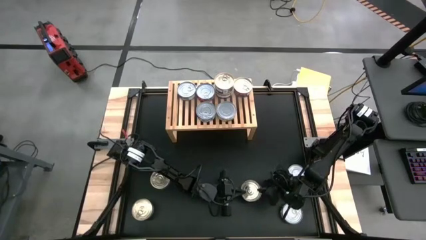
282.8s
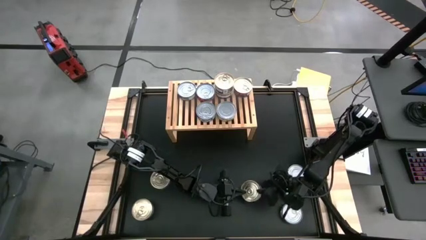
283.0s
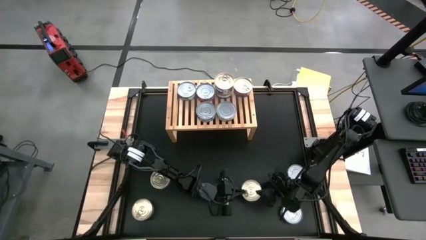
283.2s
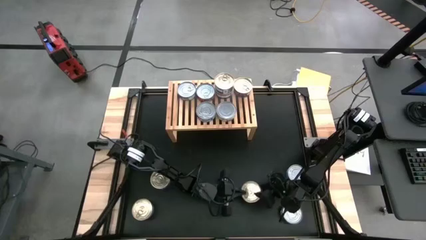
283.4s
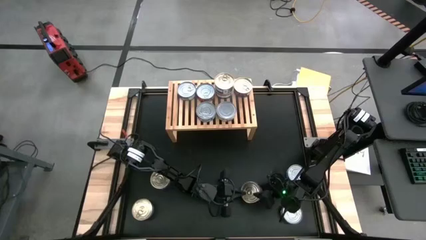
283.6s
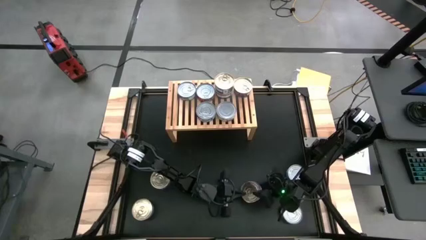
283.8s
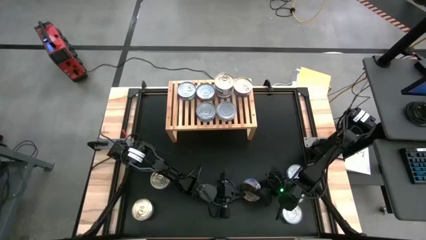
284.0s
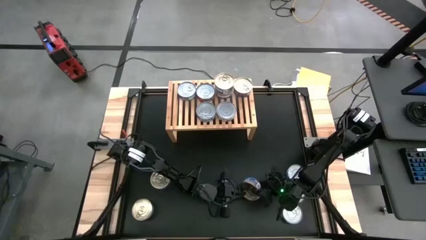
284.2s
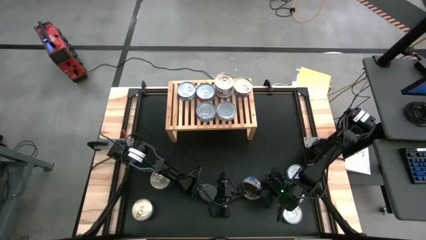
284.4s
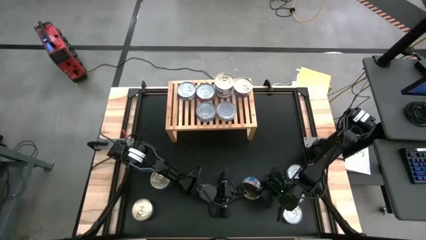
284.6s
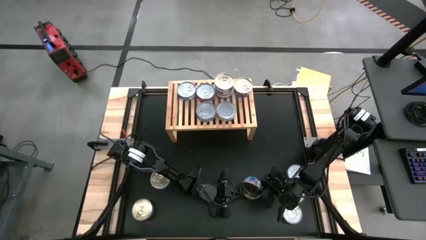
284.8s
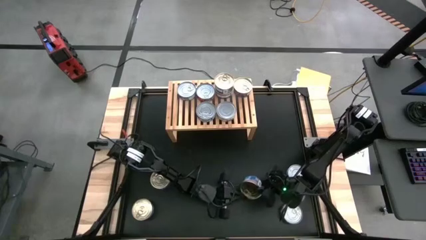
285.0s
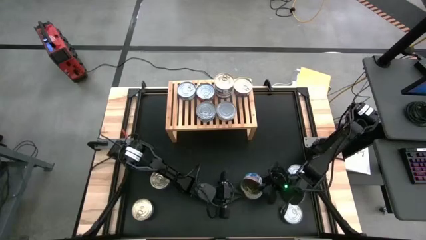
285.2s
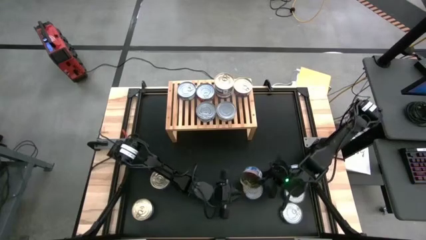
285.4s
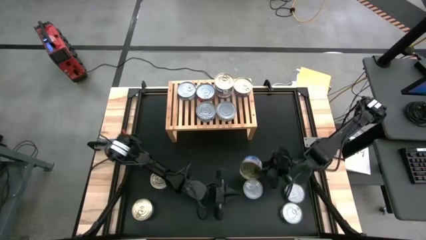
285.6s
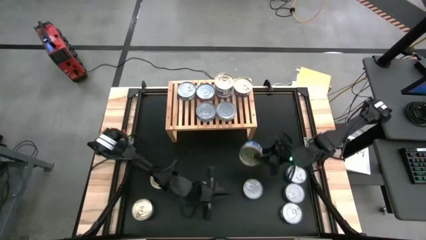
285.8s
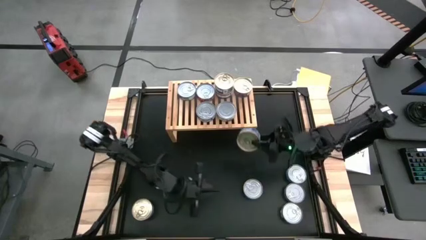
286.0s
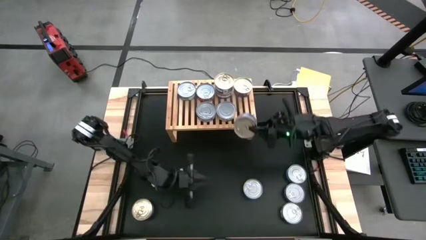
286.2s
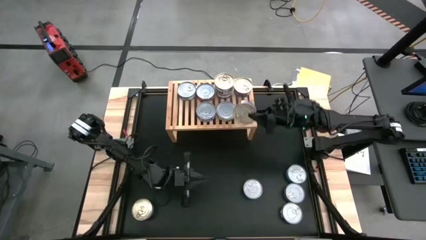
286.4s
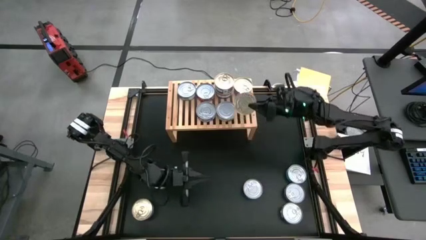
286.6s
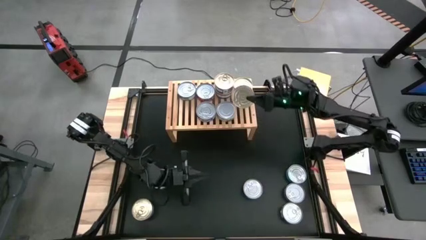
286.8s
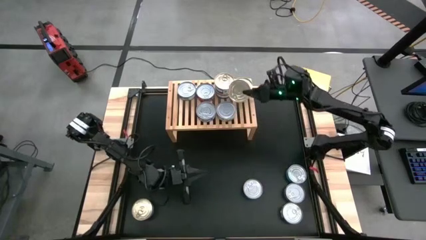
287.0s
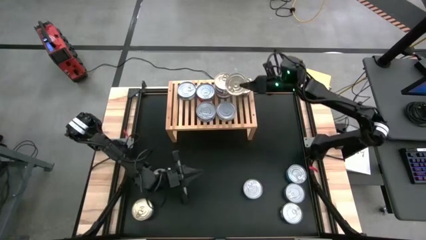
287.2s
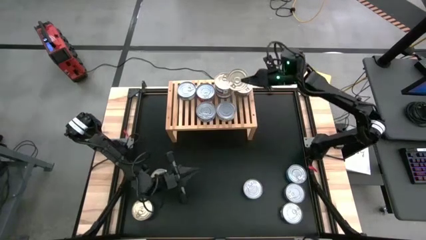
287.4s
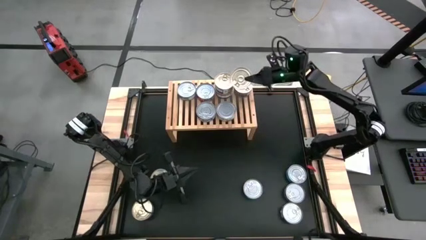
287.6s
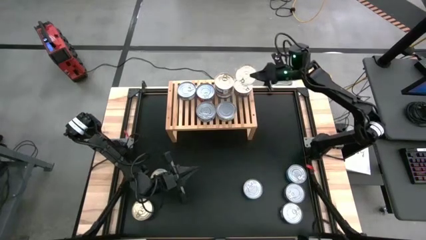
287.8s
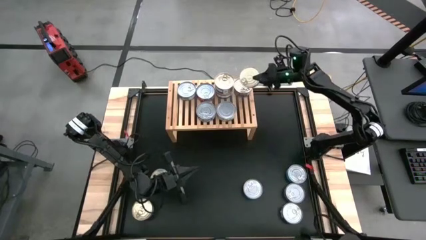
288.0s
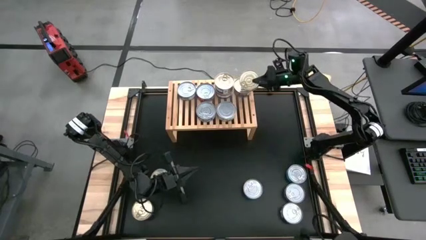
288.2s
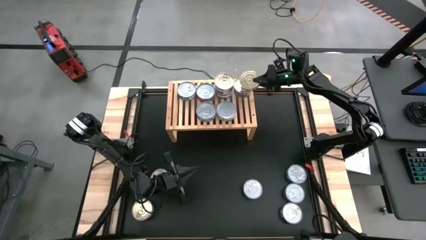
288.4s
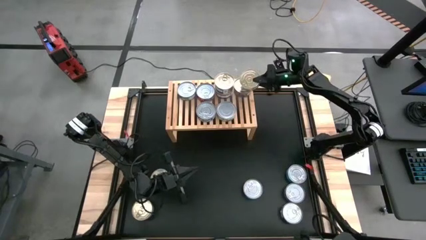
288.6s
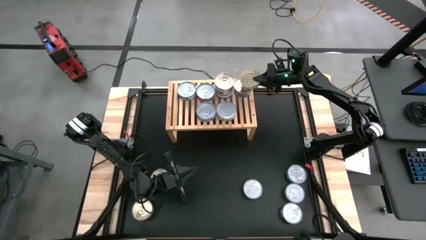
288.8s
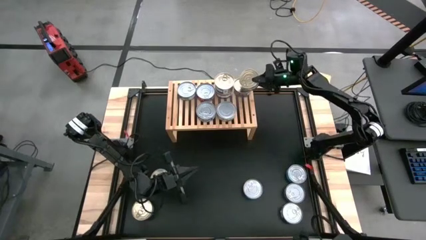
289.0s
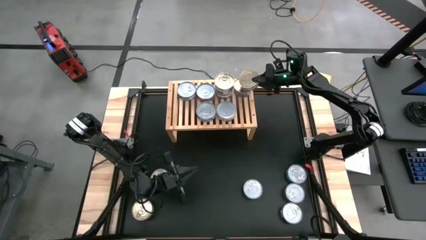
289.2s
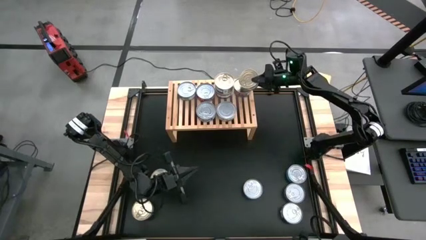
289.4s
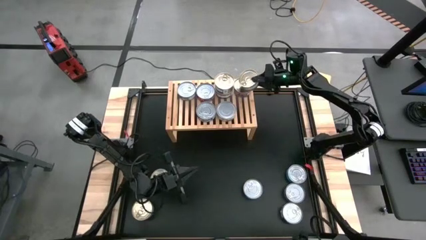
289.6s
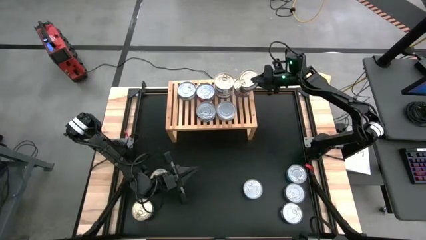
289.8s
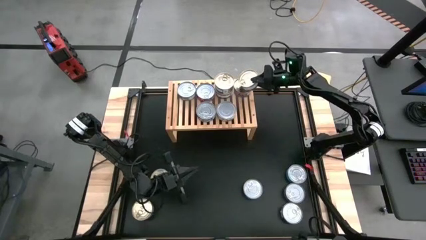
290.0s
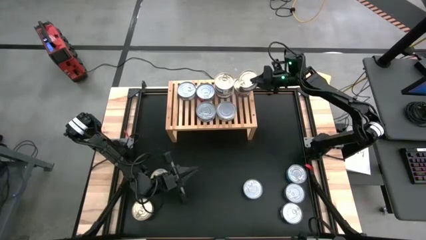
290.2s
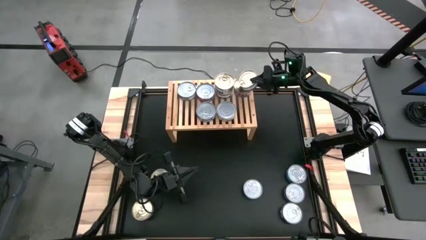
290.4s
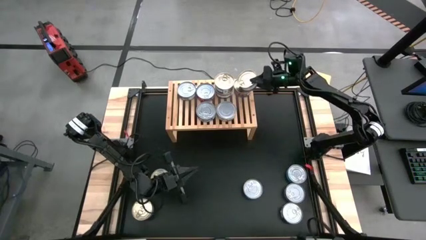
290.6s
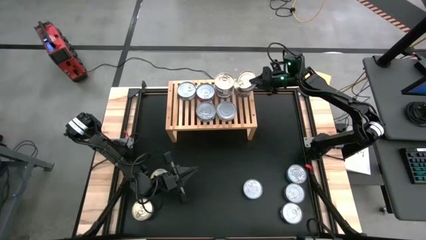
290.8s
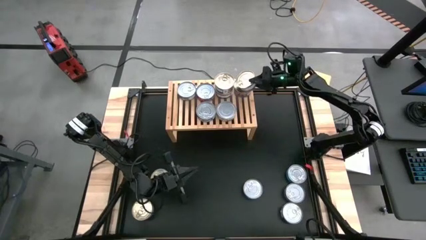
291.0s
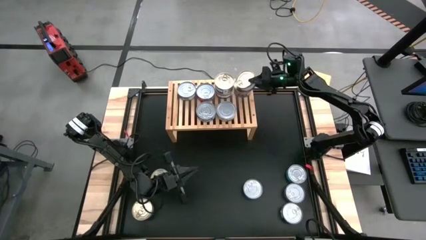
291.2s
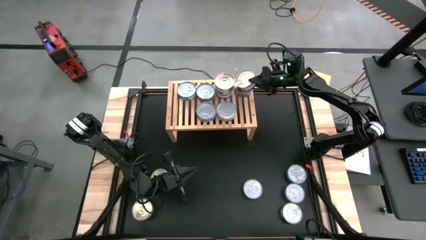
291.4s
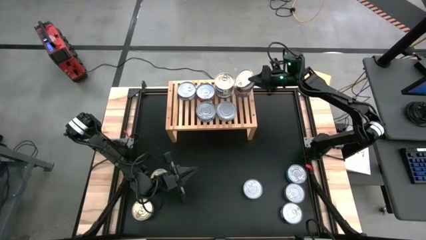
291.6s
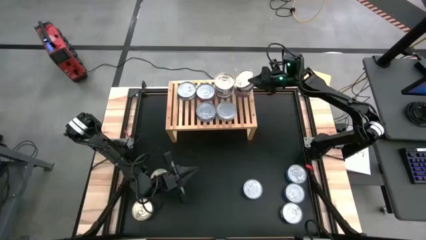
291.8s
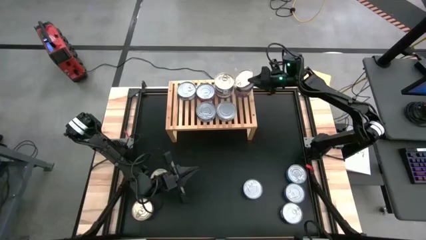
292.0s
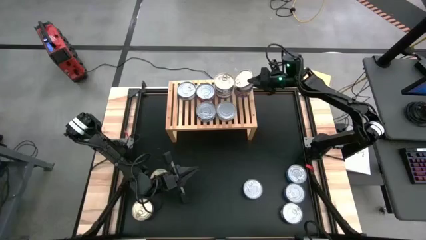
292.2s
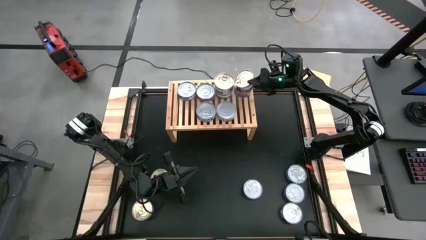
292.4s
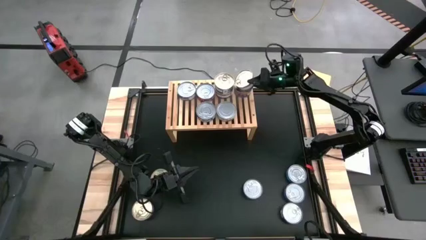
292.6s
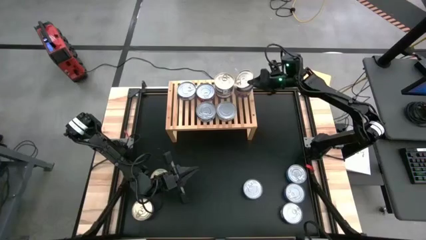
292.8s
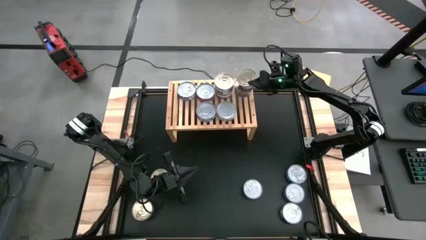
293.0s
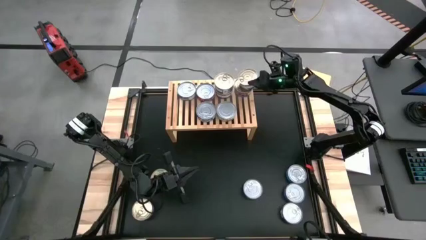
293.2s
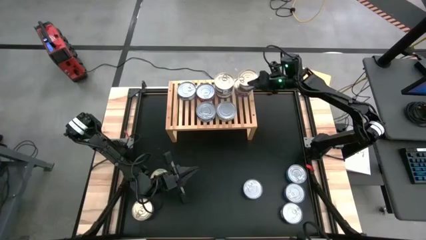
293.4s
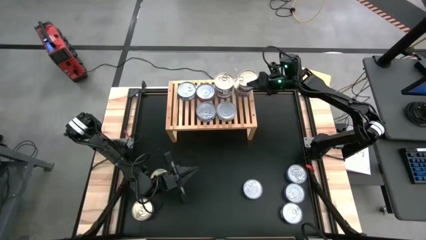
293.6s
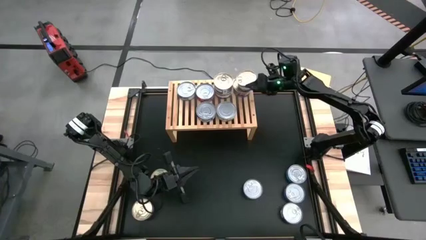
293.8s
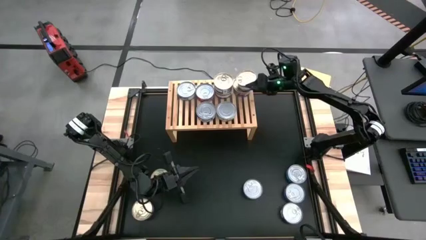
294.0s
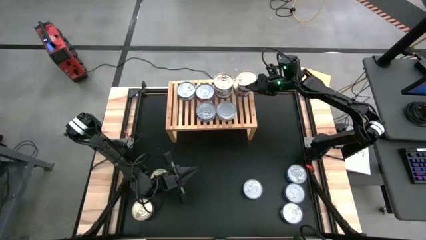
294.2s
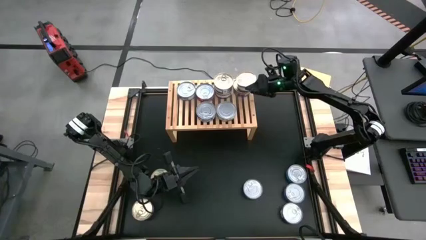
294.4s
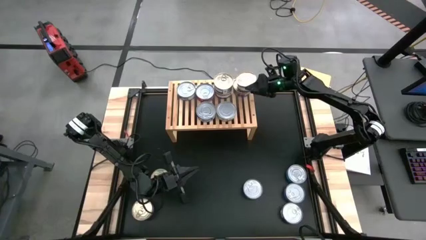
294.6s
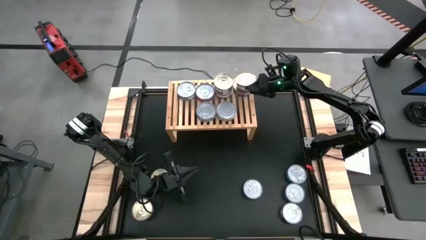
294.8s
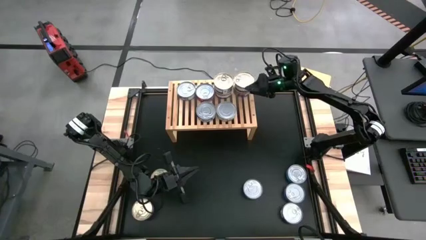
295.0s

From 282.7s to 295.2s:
Task: Stack canned seafood by type on shelf
Stack the blue and pink tuna can on top of the blue and pink tuna can

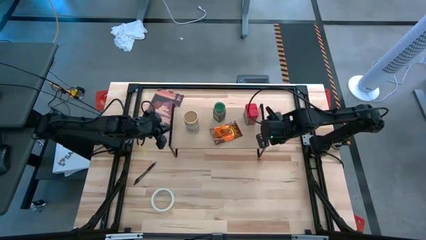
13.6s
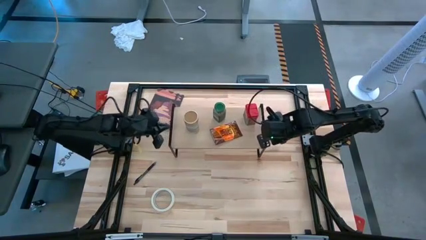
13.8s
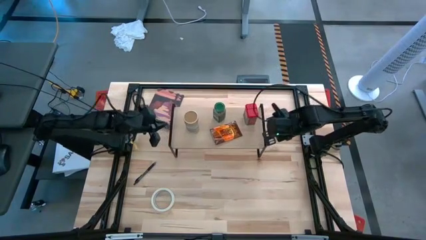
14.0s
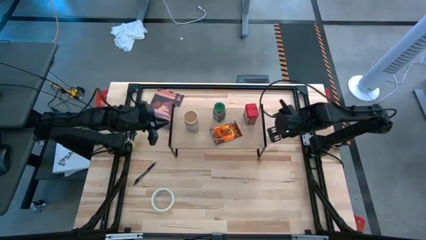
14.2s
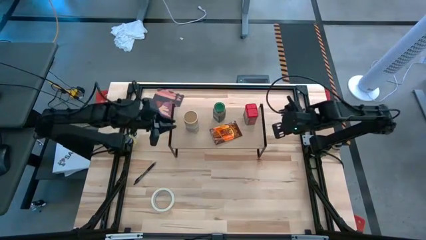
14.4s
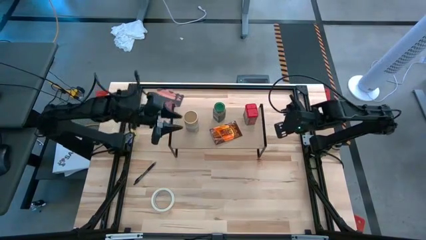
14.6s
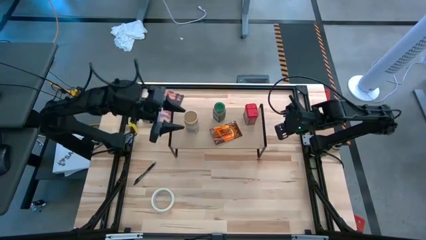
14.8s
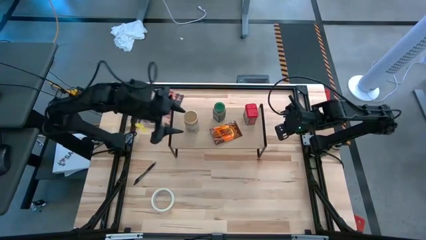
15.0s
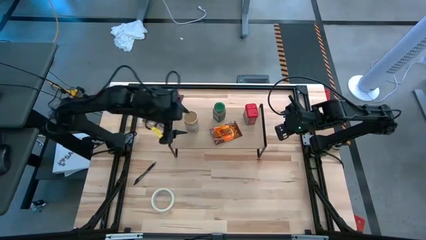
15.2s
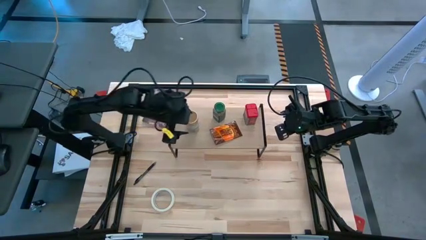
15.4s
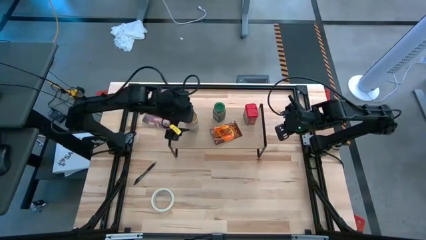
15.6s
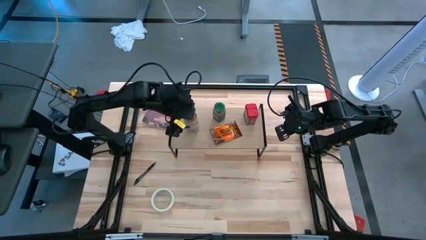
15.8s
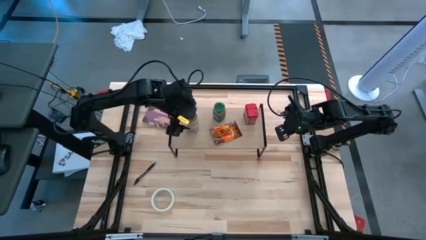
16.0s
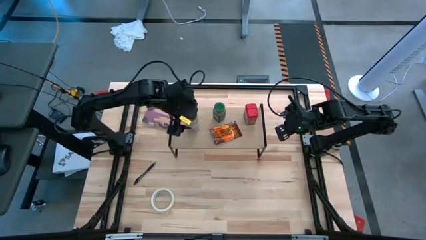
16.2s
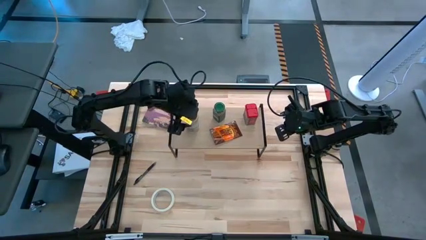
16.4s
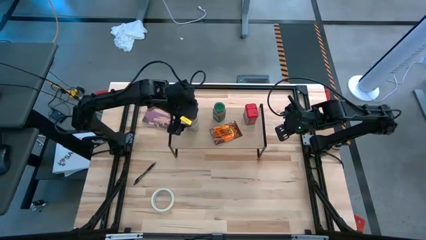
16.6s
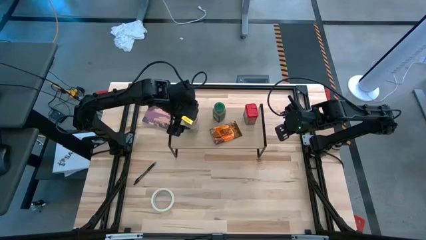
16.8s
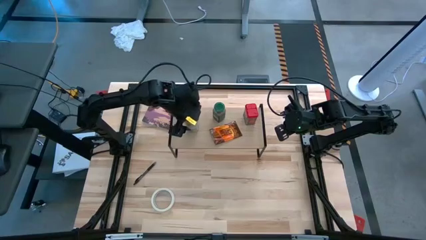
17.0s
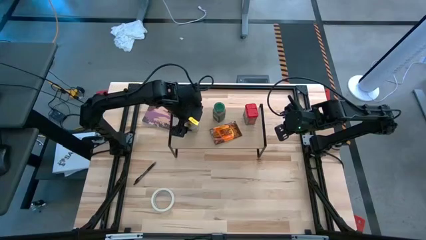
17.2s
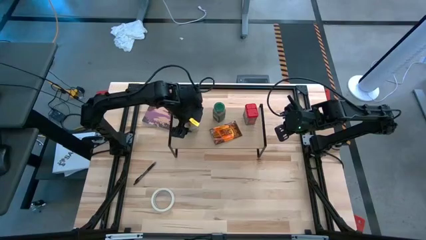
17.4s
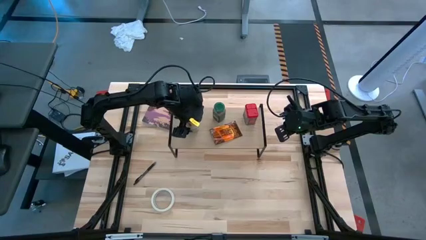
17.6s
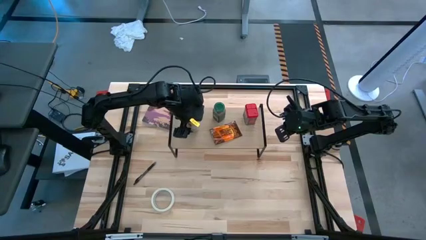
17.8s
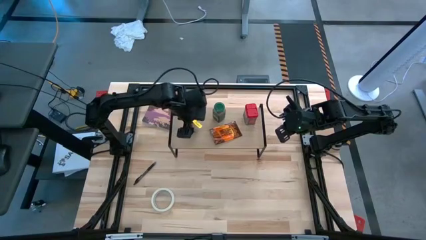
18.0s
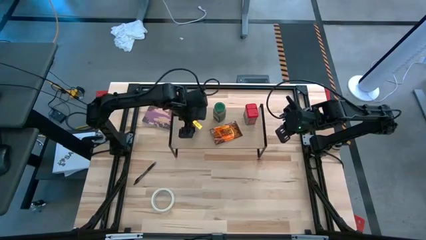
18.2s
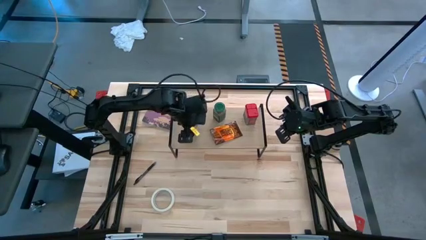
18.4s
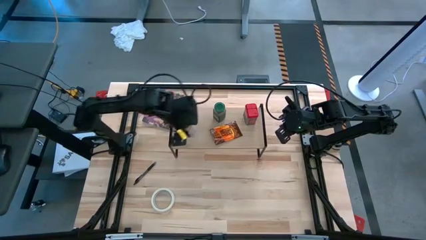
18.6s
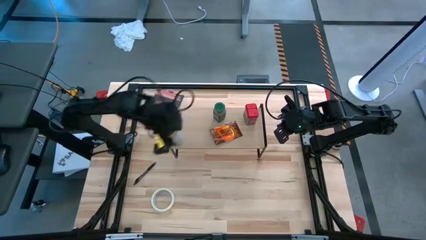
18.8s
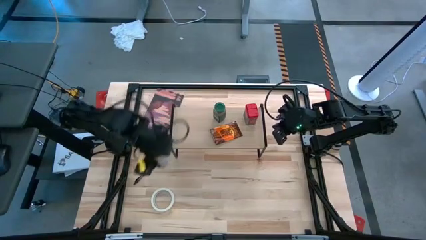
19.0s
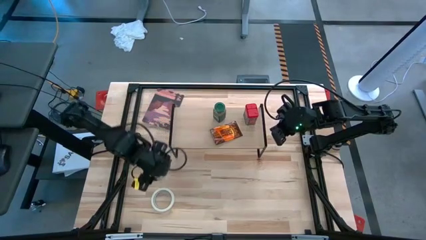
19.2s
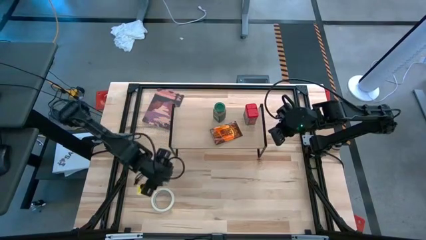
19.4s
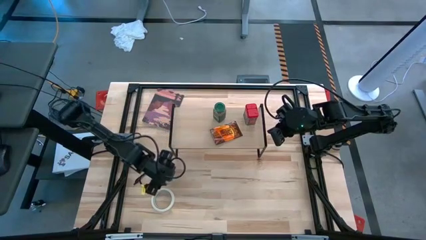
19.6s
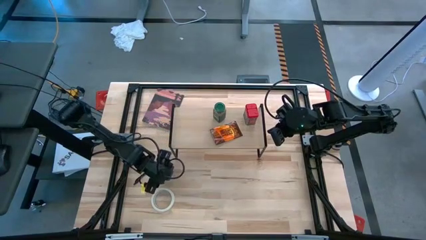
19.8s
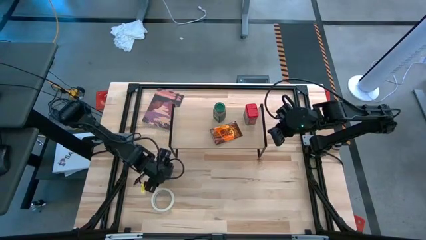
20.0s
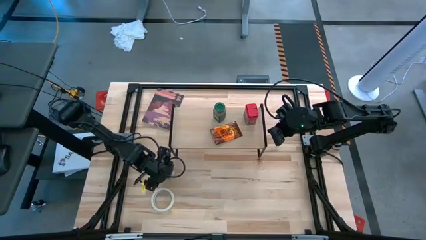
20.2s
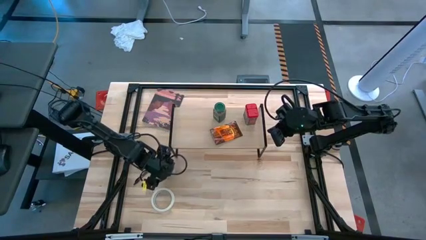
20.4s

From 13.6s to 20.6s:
Task: Shelf spices
Remove the brown seasoning bottle from the shelf
